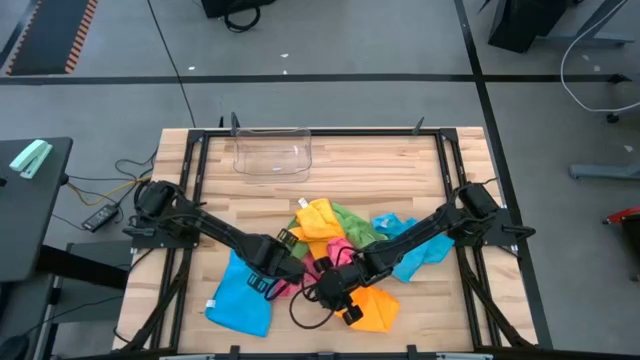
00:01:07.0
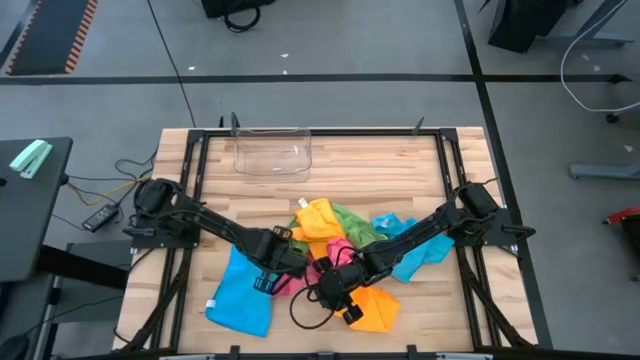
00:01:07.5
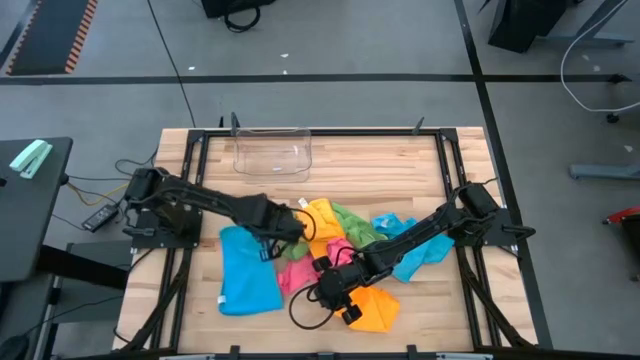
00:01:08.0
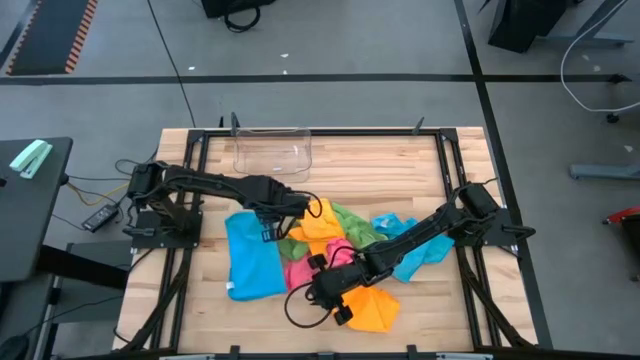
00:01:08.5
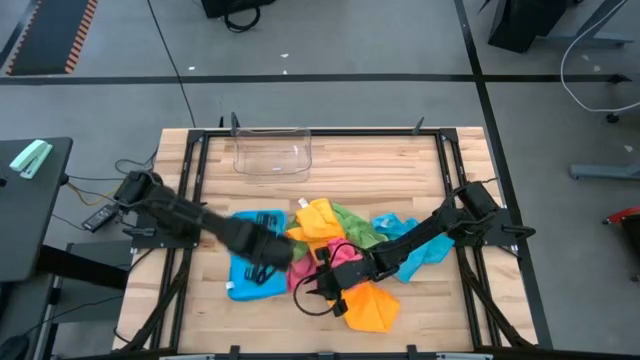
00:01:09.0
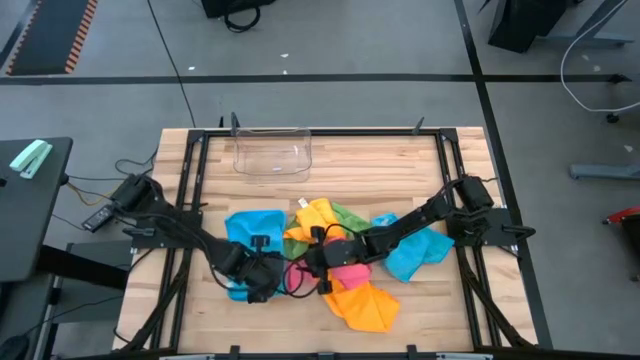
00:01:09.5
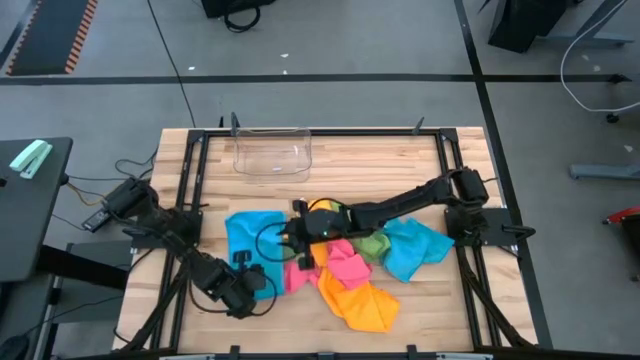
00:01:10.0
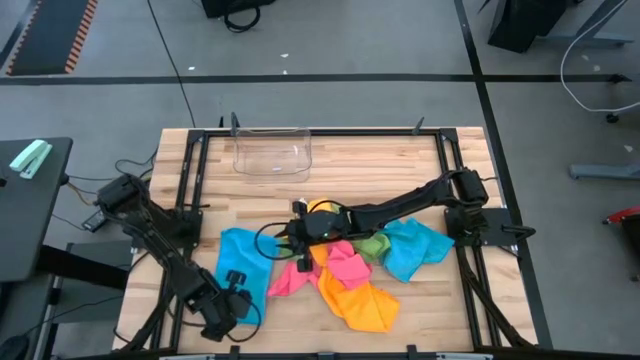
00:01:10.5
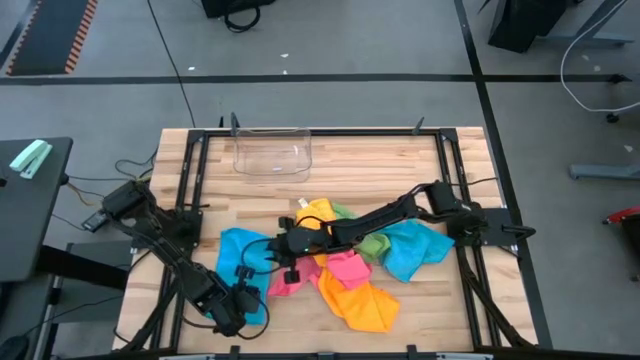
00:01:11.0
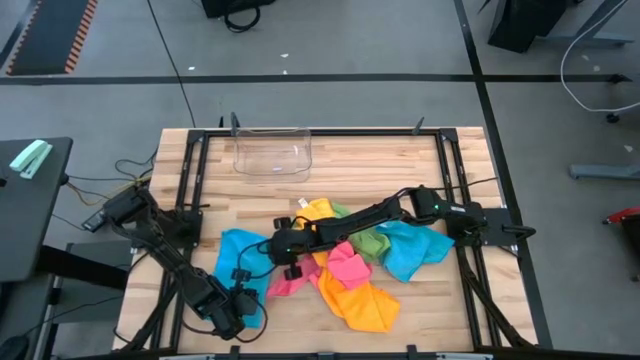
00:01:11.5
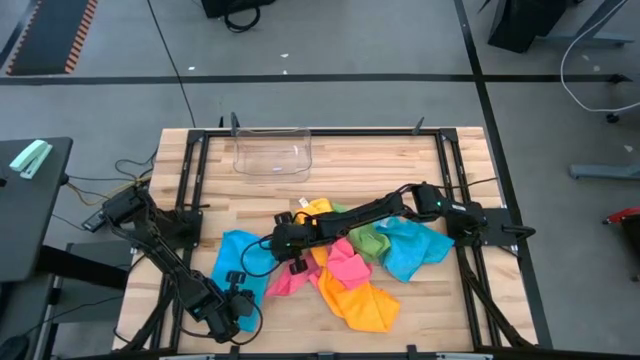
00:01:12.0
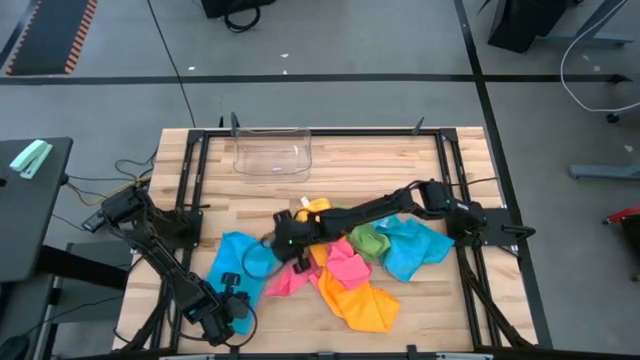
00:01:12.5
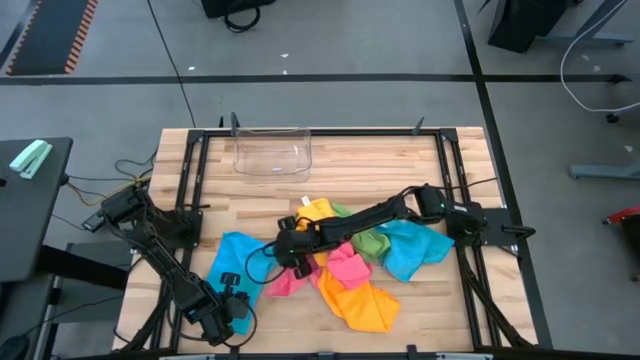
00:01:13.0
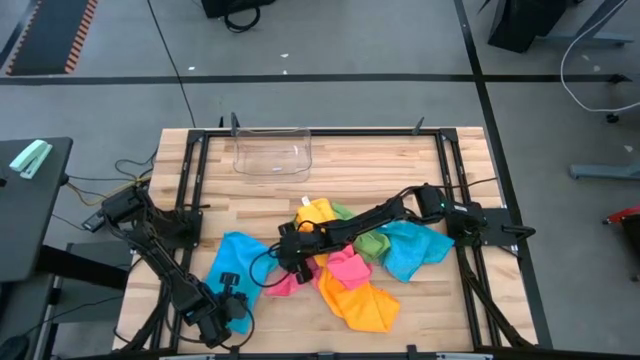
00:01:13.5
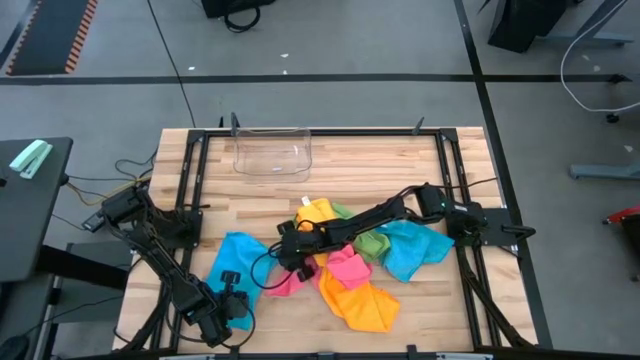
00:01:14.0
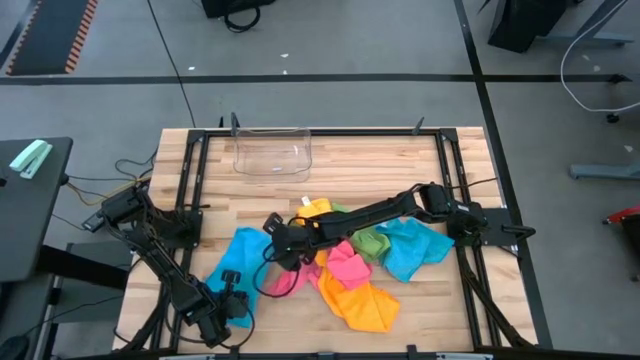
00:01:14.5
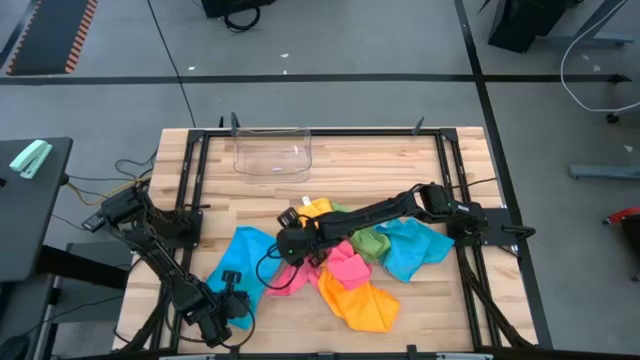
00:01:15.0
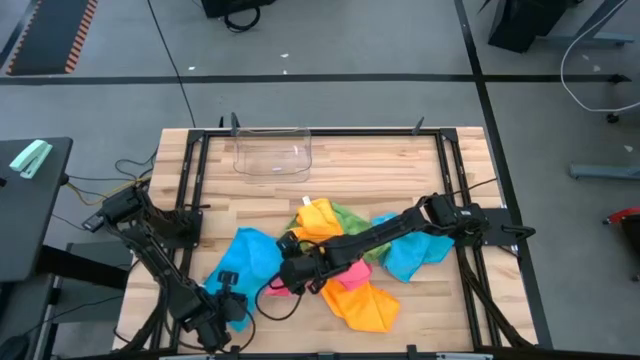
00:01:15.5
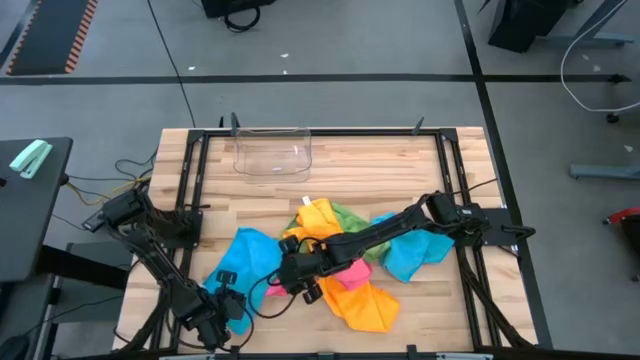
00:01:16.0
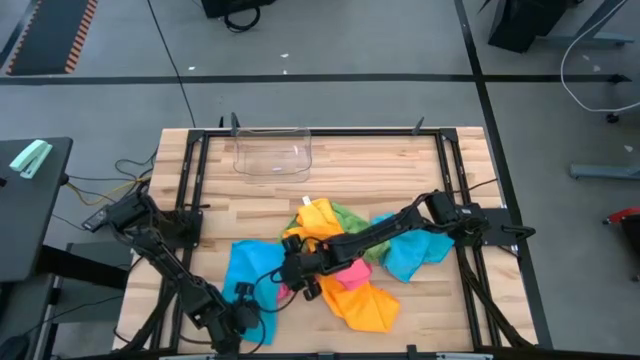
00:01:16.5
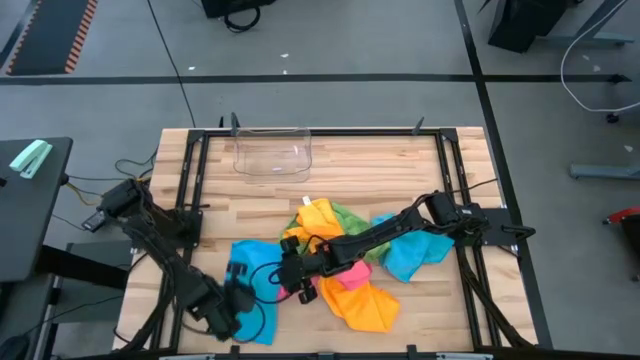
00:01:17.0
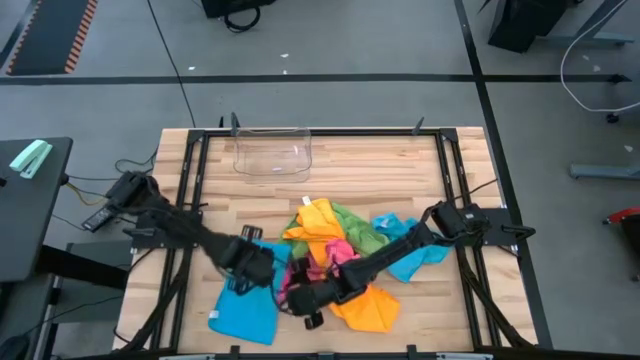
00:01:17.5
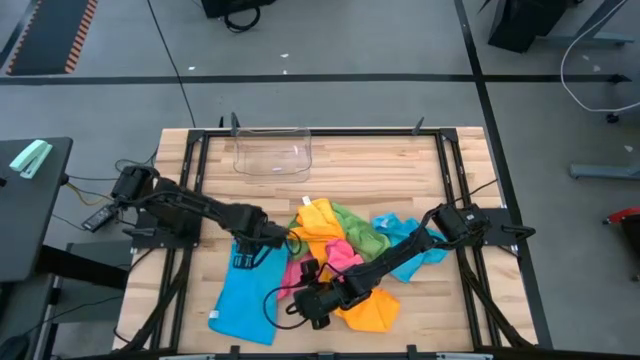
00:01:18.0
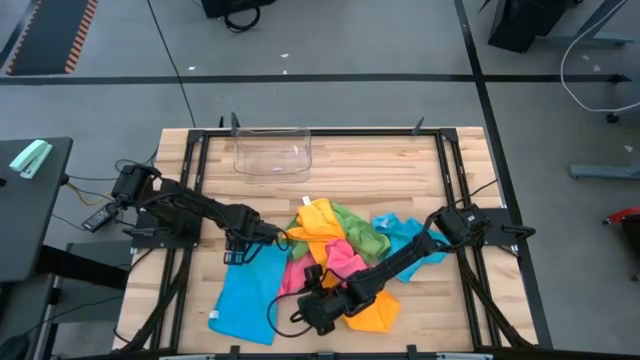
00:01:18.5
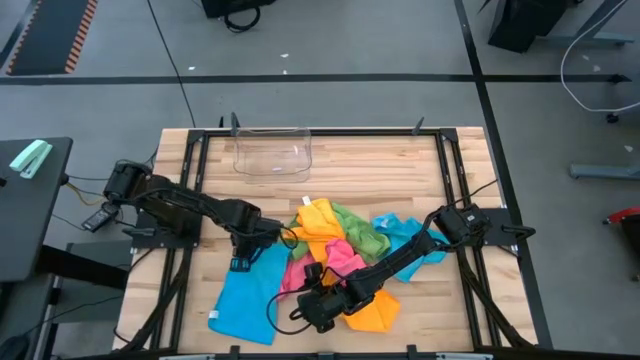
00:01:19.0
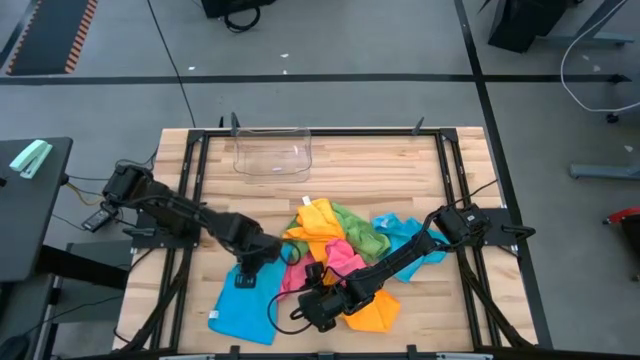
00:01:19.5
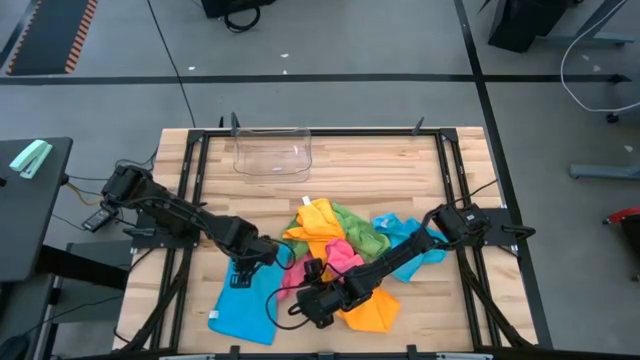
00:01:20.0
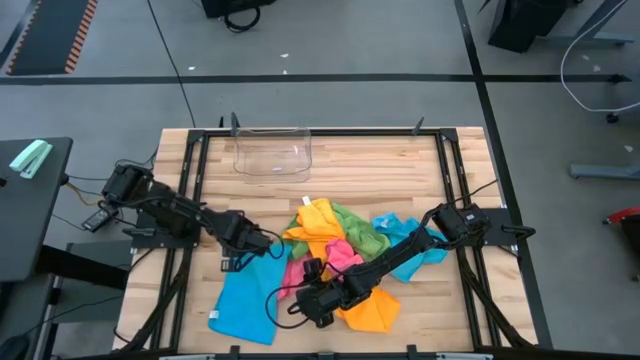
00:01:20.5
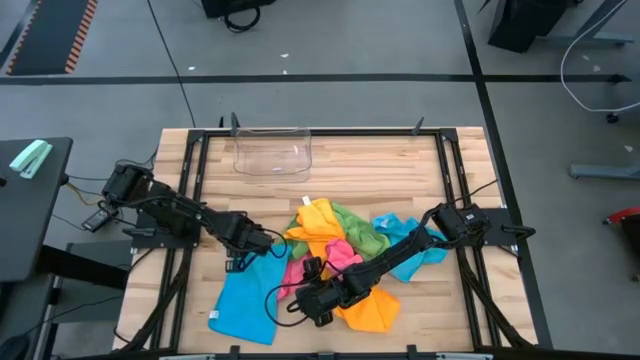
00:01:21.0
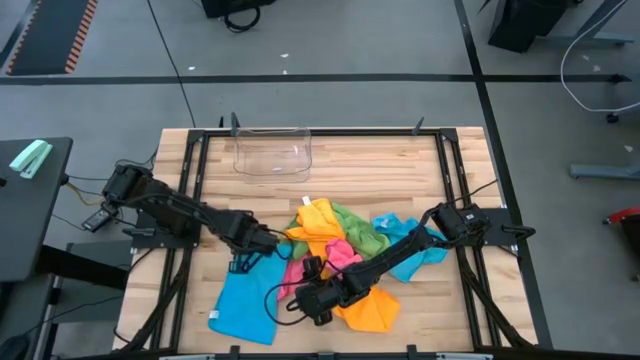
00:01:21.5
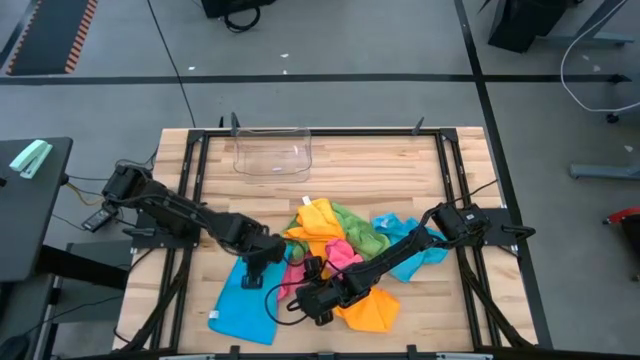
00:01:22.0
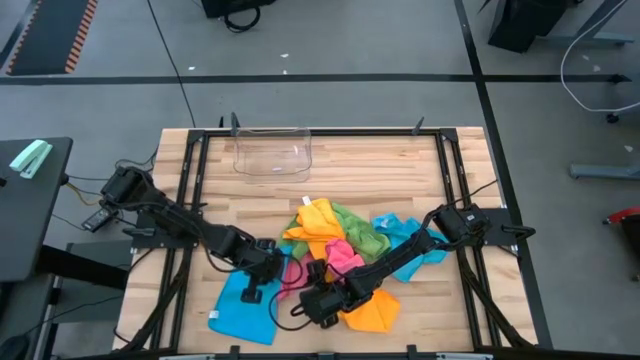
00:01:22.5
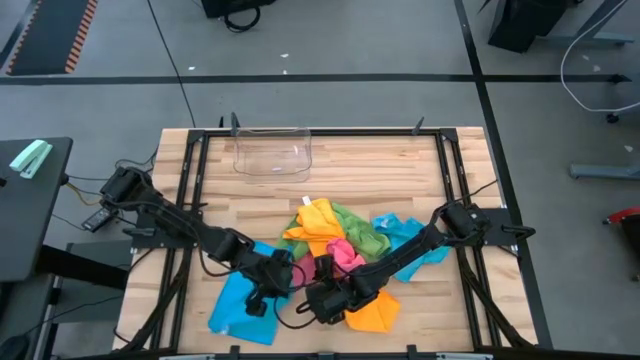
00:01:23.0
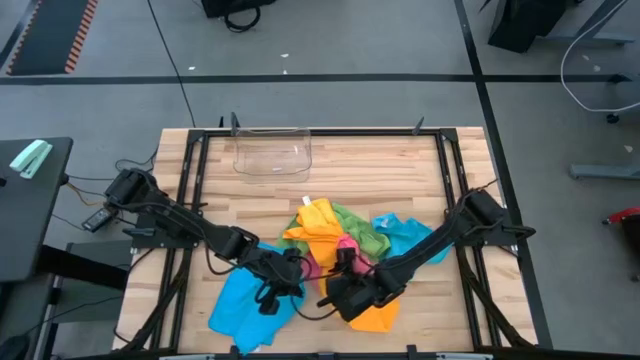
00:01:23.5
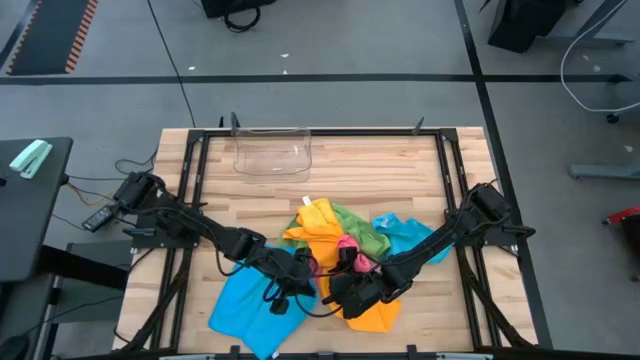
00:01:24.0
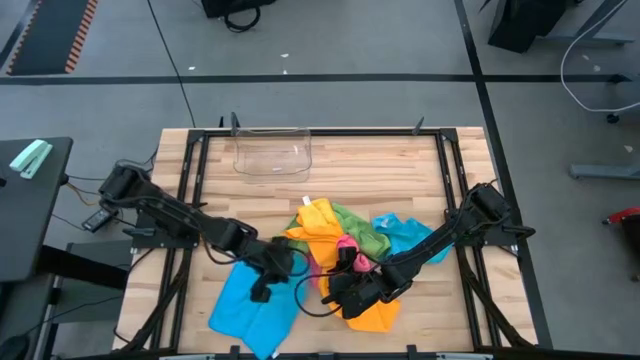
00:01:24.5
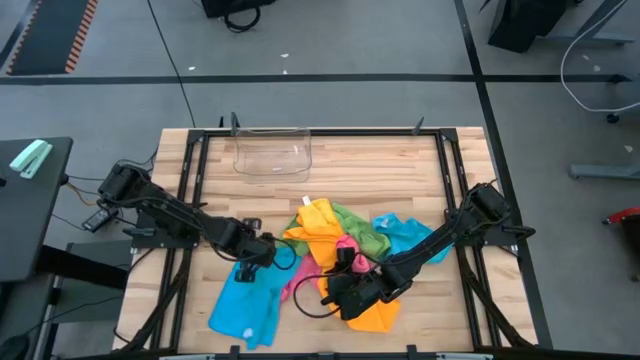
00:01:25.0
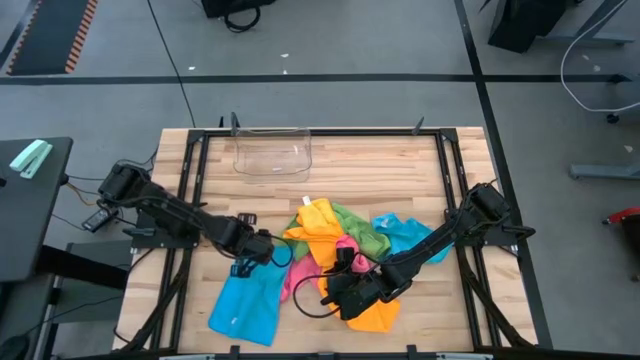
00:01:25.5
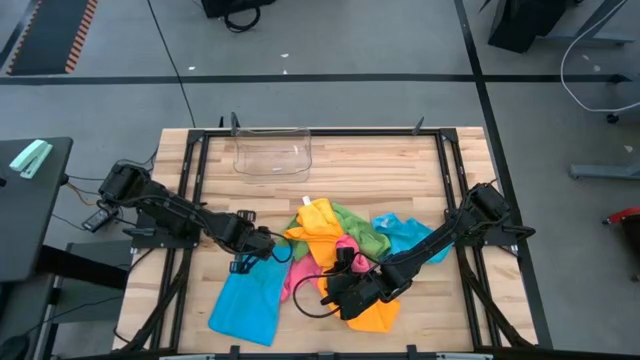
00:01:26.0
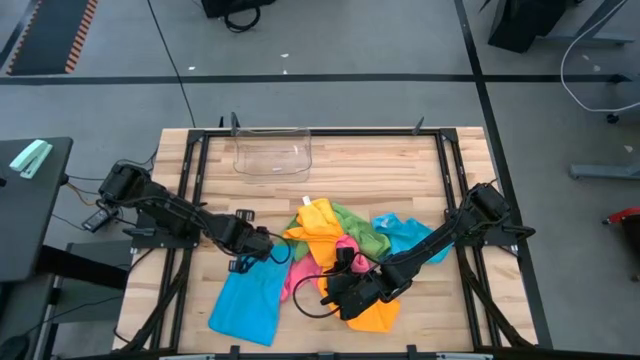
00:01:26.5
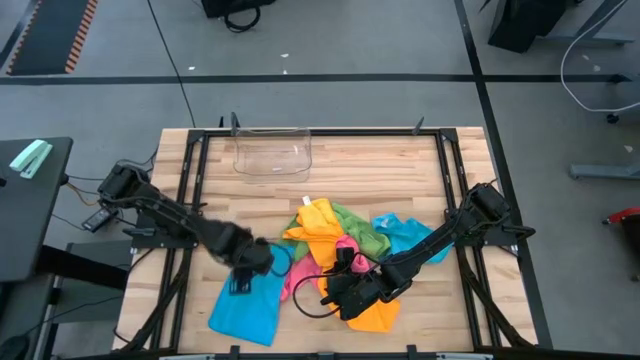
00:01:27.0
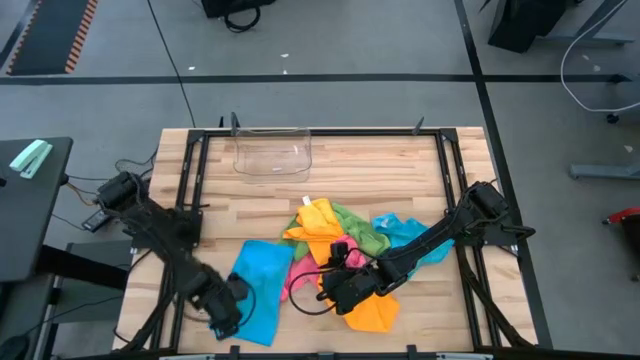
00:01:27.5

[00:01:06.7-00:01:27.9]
Task: Fold microfiber towels
Fold the left blue microfiber towel
